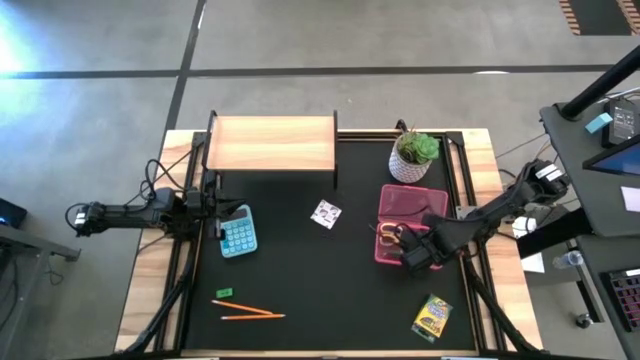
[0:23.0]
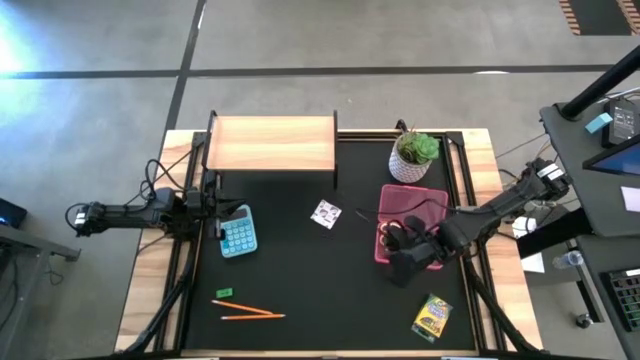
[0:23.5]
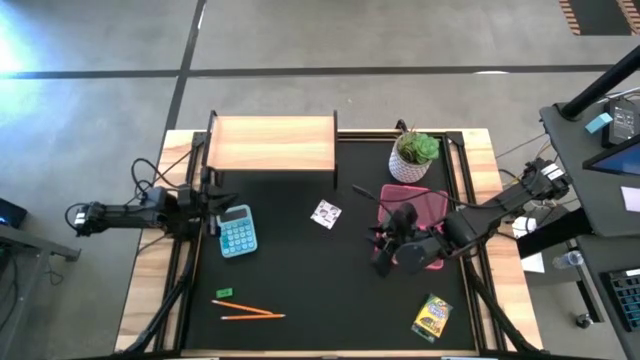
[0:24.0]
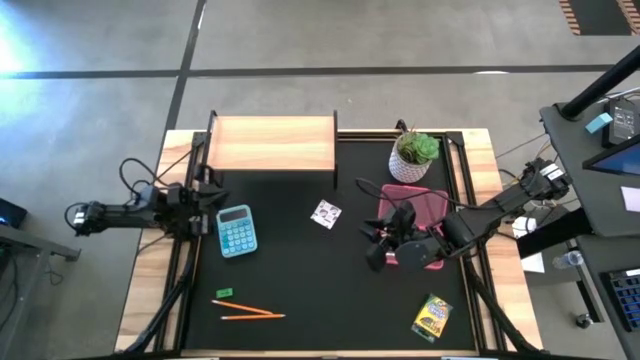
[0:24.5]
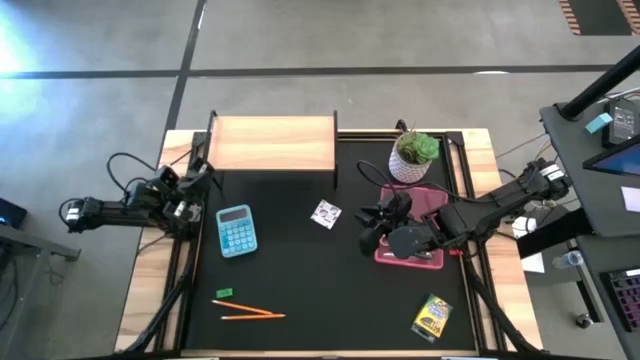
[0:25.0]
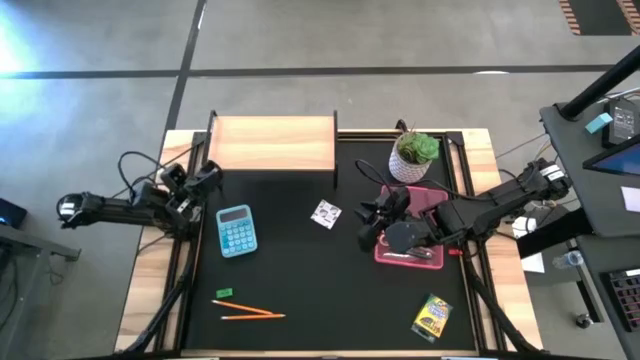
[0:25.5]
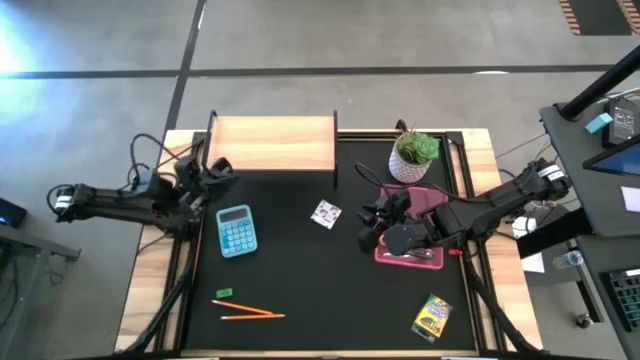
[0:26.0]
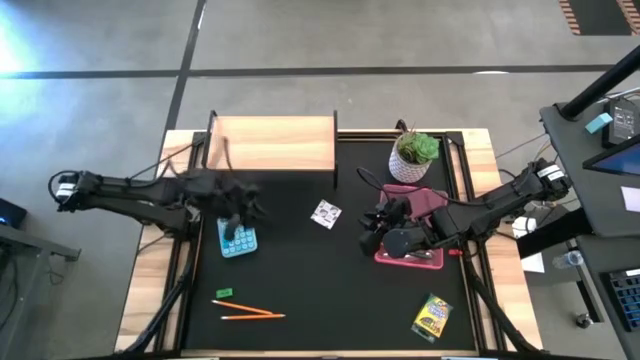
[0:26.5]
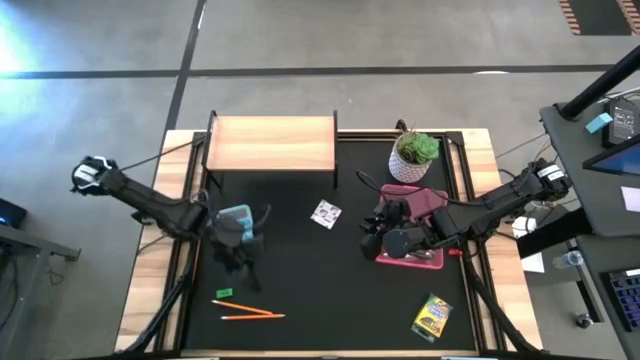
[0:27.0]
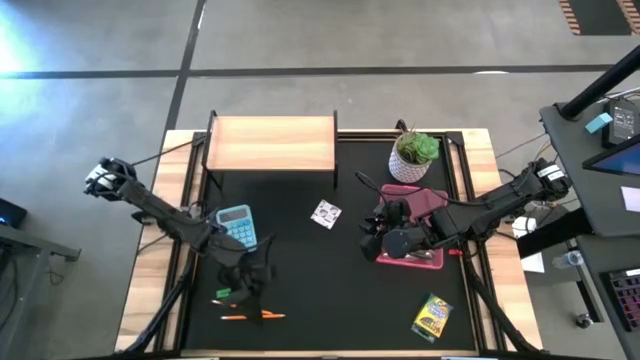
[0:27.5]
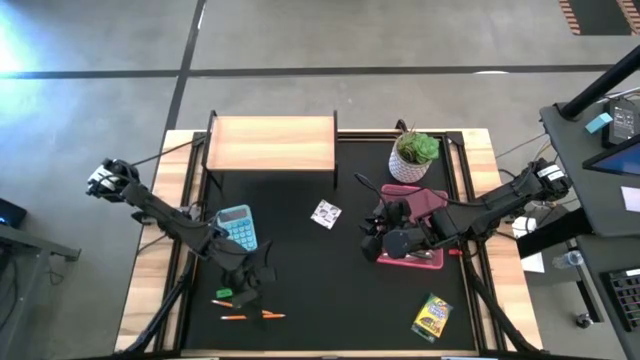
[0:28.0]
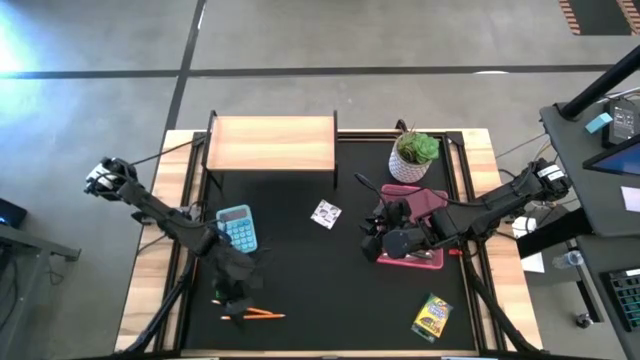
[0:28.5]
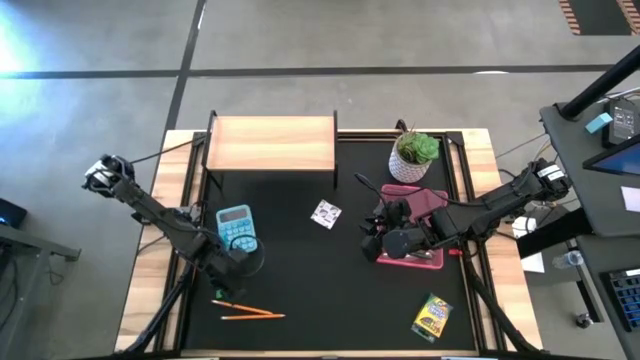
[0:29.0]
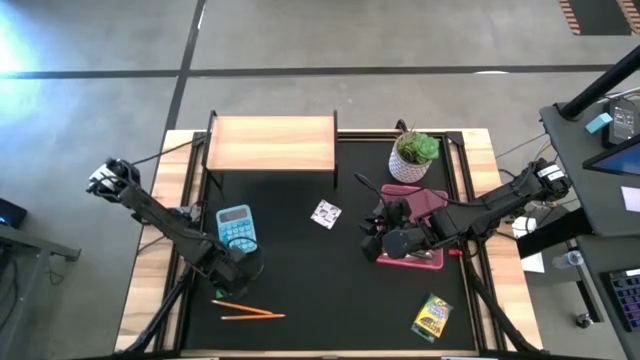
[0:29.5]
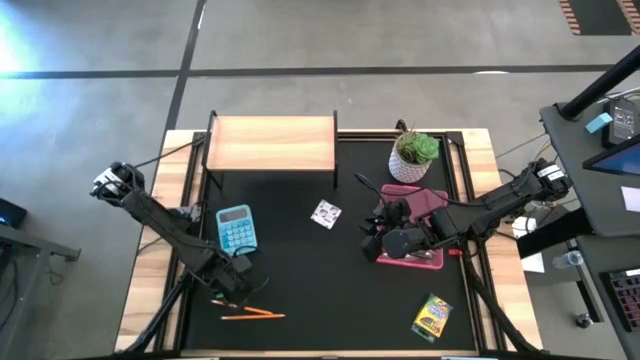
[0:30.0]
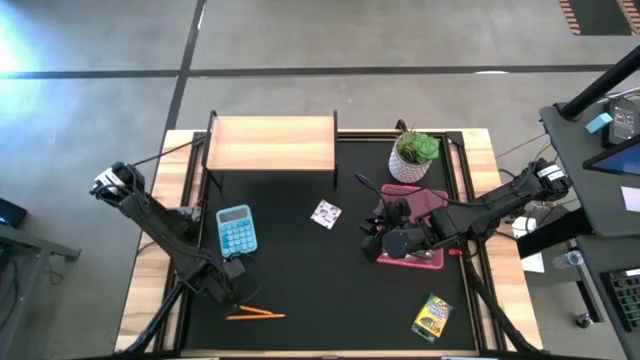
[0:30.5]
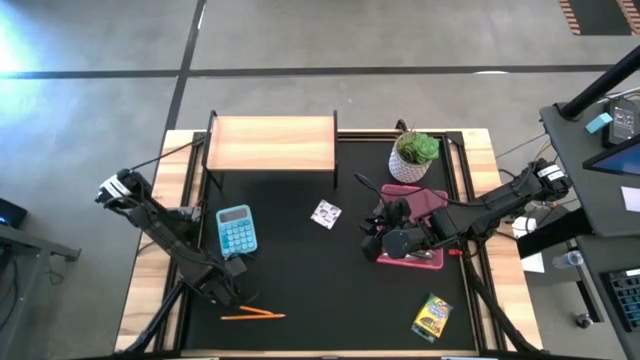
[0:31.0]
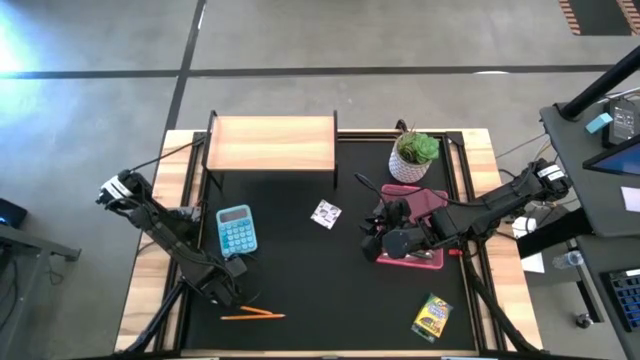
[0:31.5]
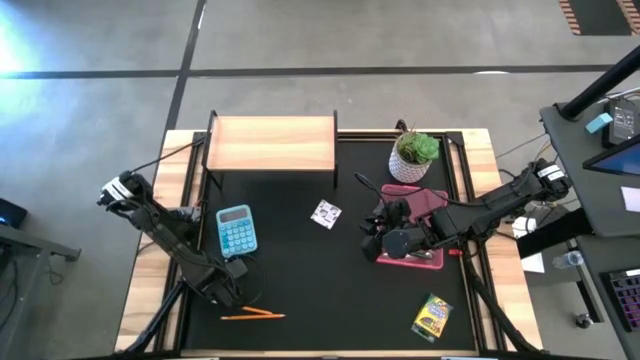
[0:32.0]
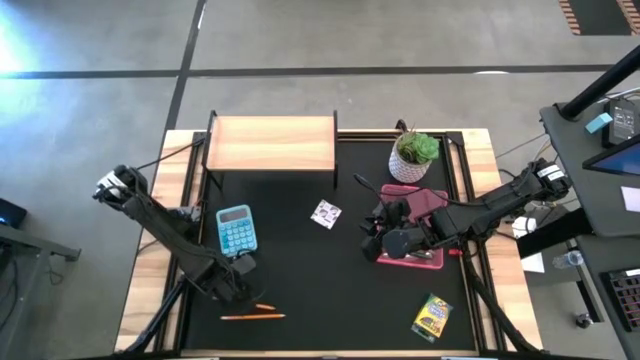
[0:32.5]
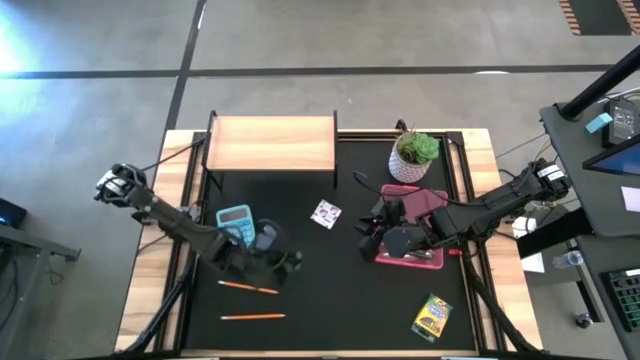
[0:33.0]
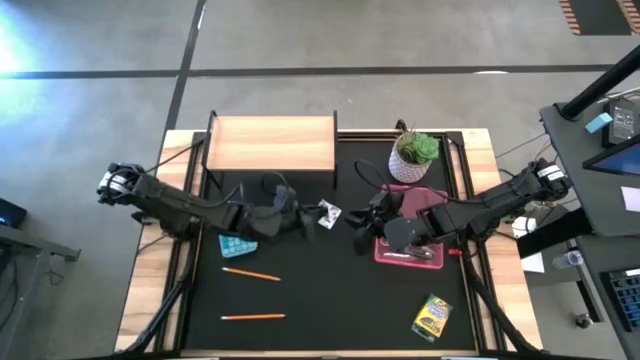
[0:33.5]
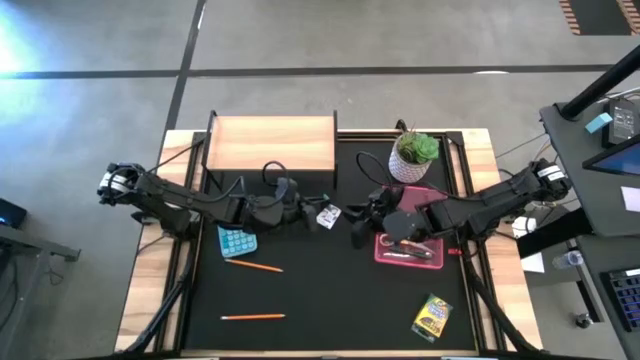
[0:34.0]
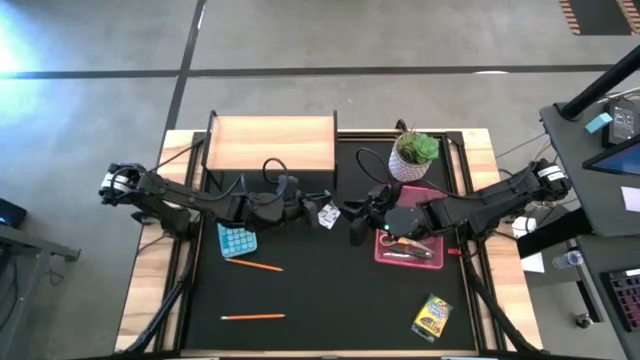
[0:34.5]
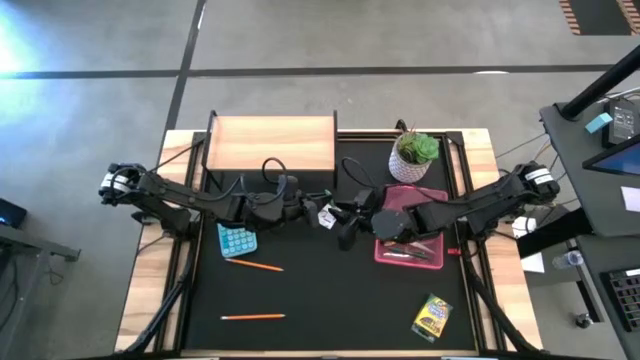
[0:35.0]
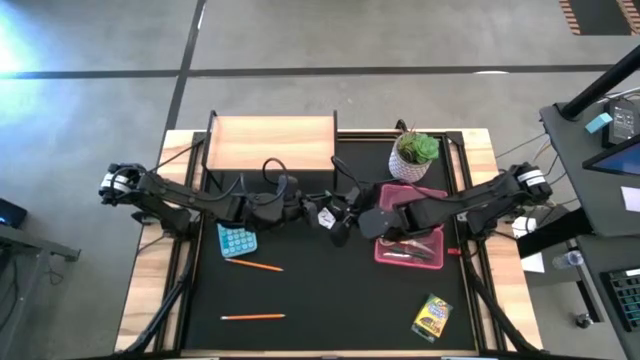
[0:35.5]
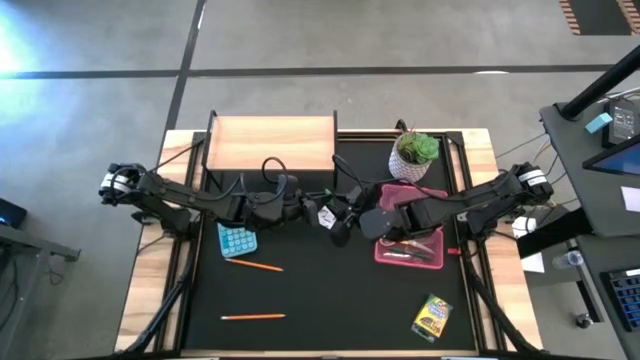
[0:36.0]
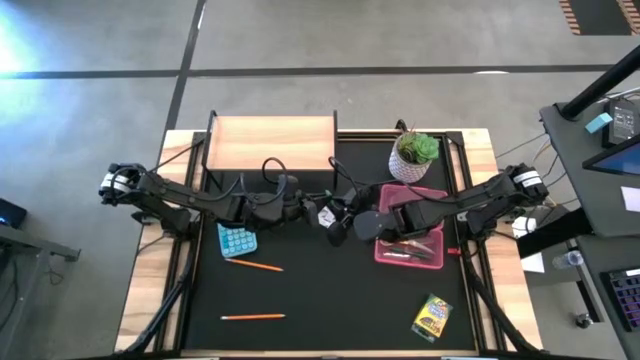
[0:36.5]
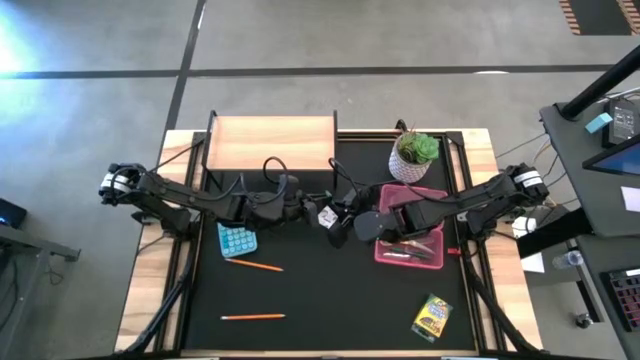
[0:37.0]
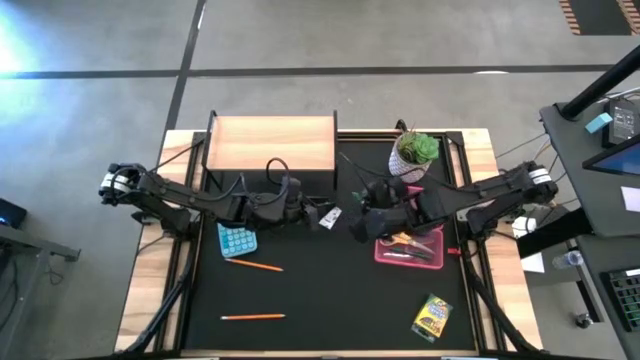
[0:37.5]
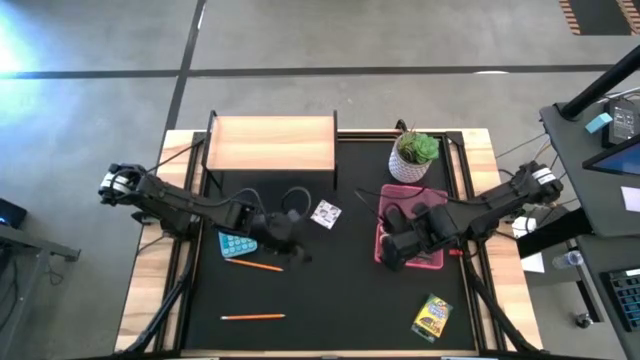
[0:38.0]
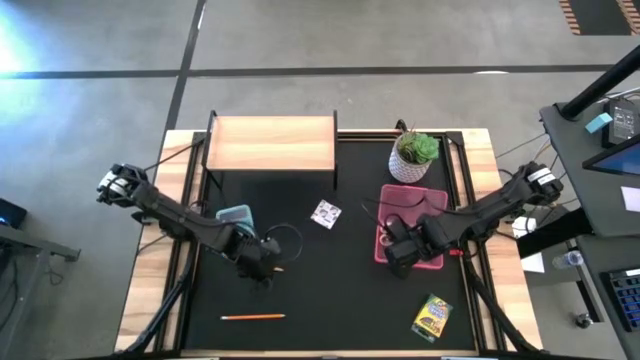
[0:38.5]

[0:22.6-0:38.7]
Task: Pack school essentials
Put the green eraser into the pink case

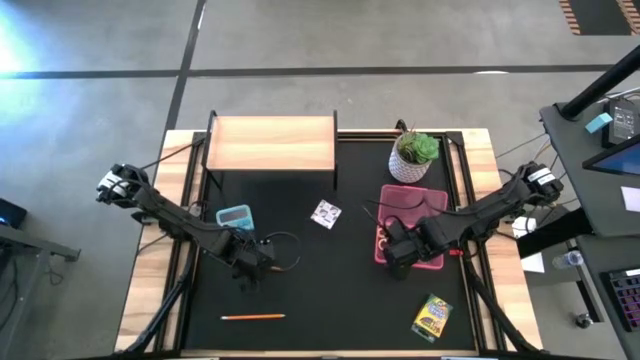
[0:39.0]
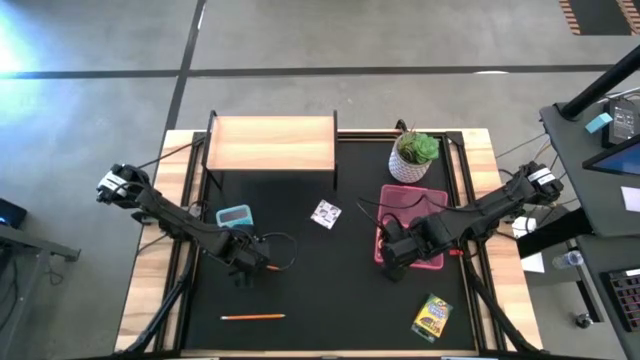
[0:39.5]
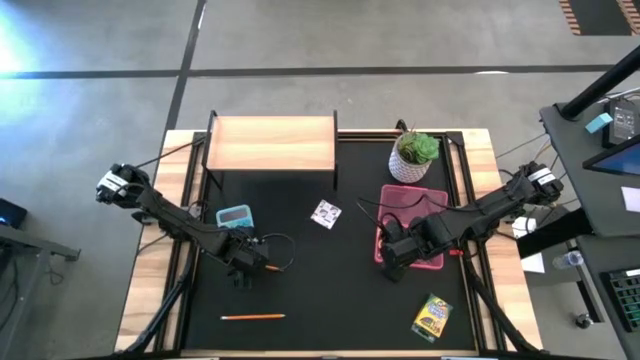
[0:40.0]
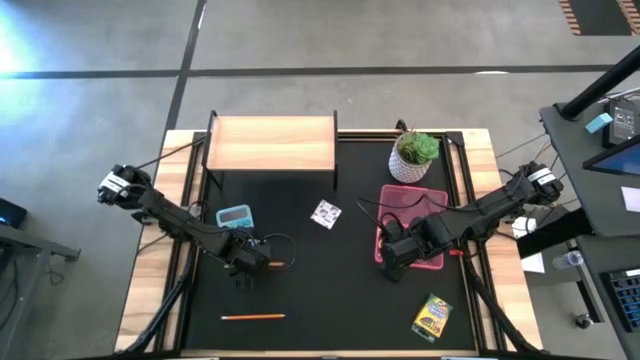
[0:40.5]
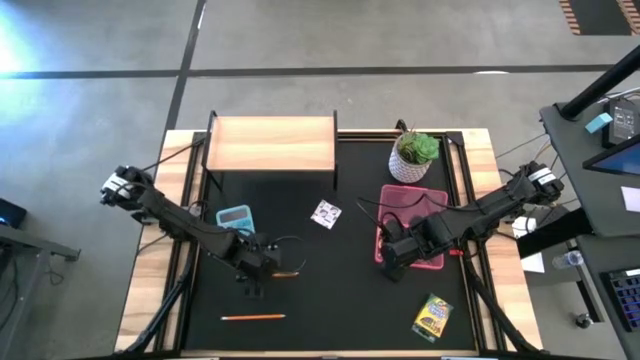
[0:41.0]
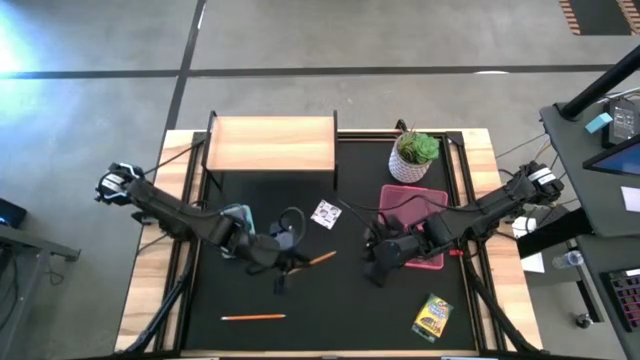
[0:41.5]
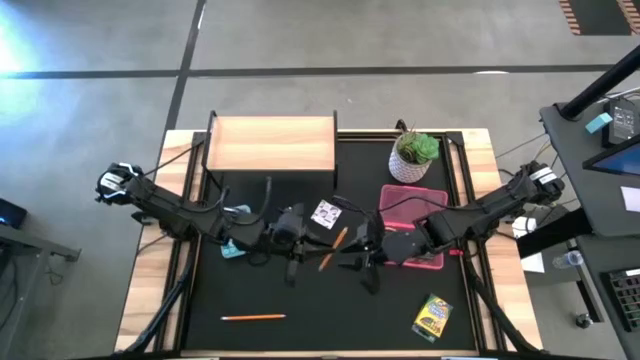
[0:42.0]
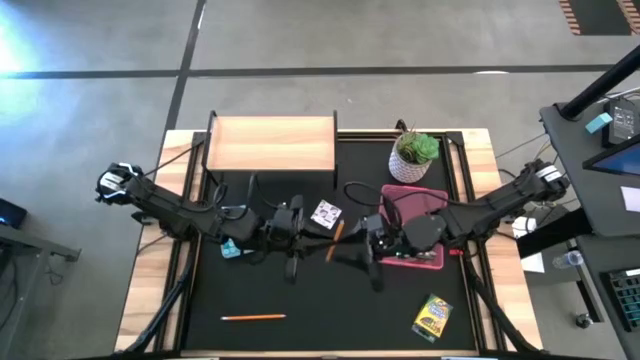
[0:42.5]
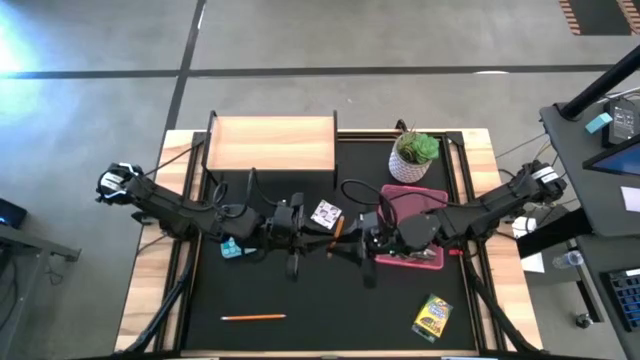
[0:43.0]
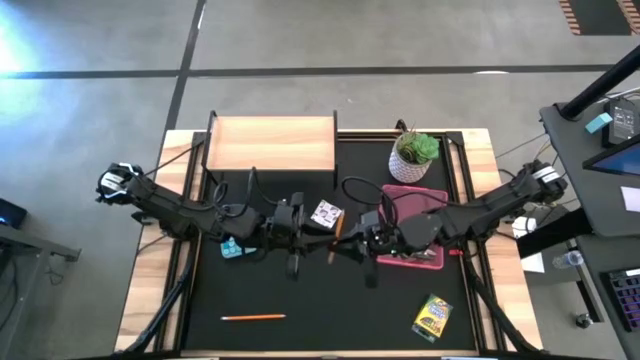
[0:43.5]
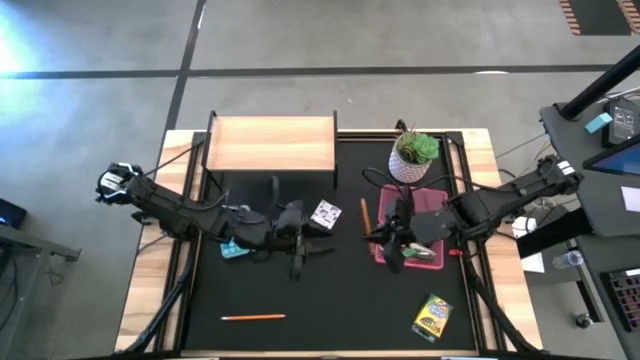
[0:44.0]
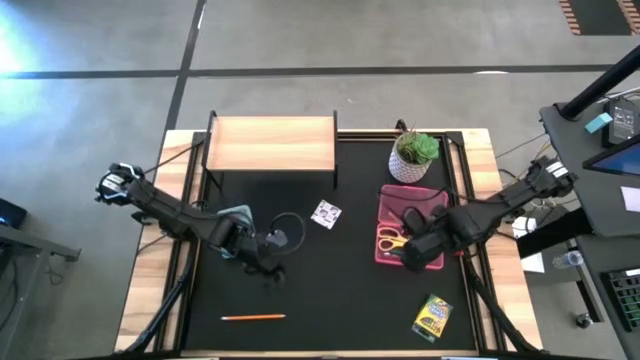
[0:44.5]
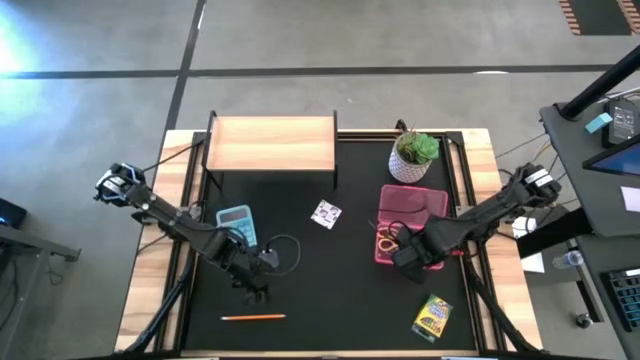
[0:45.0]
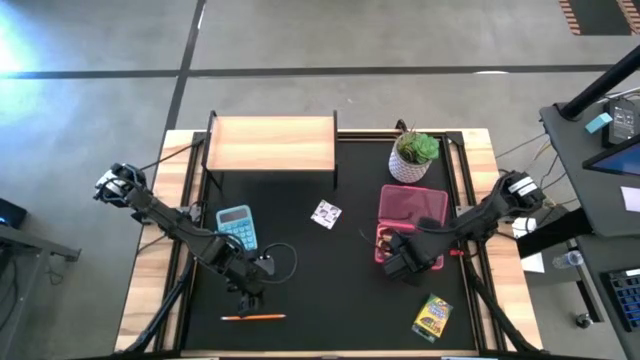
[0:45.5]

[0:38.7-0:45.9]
Put the top yellow pencil into the pink case
